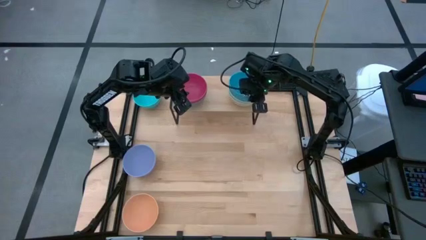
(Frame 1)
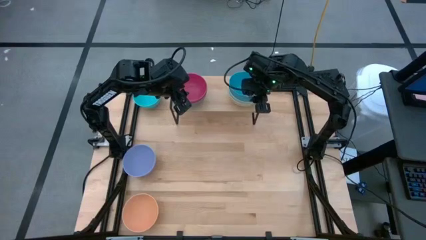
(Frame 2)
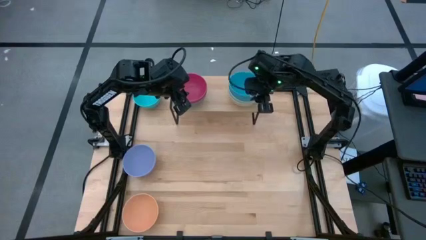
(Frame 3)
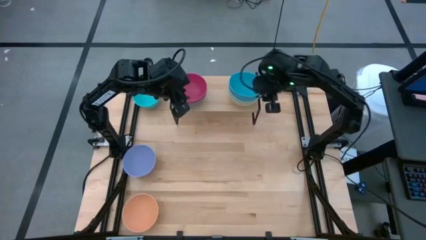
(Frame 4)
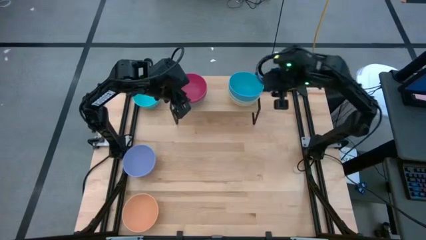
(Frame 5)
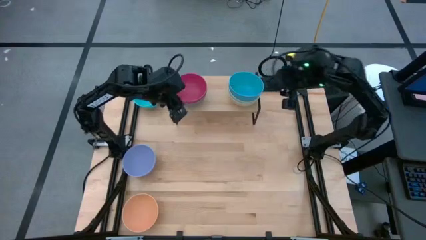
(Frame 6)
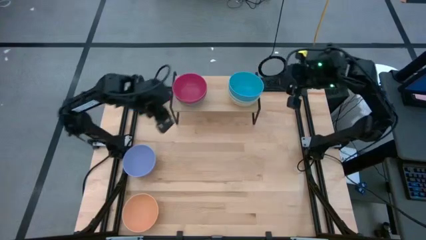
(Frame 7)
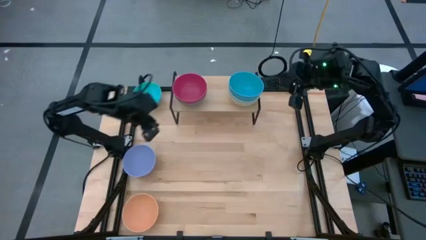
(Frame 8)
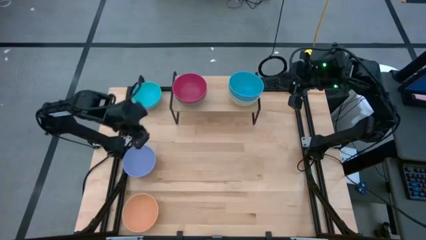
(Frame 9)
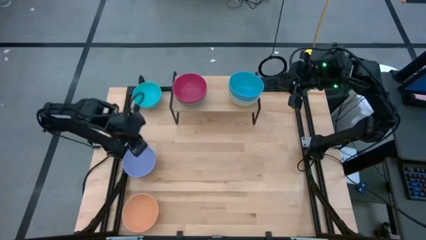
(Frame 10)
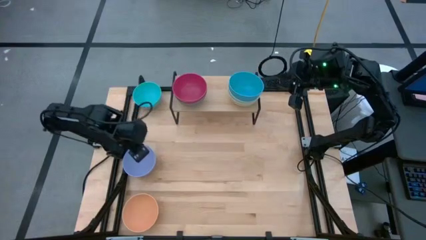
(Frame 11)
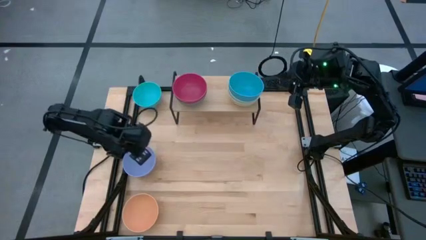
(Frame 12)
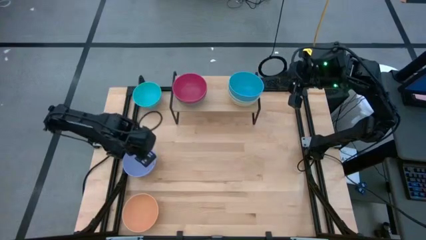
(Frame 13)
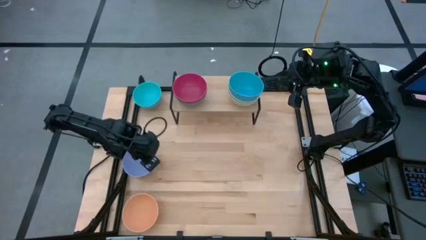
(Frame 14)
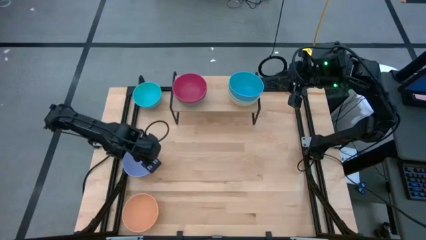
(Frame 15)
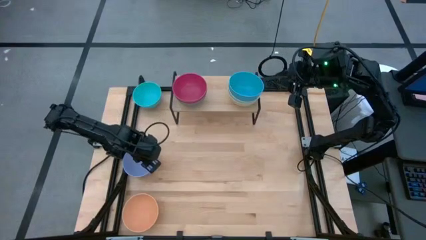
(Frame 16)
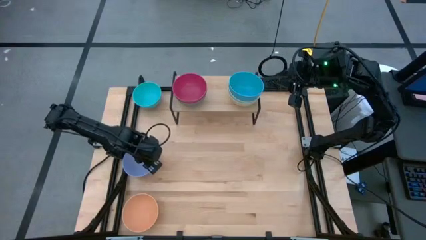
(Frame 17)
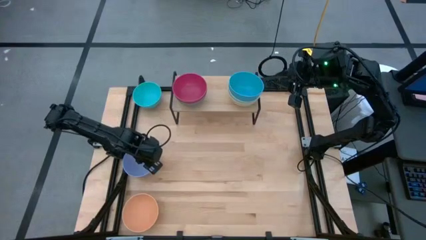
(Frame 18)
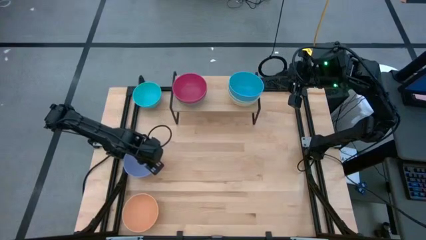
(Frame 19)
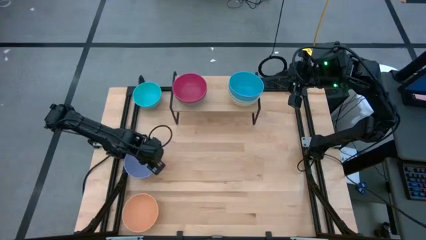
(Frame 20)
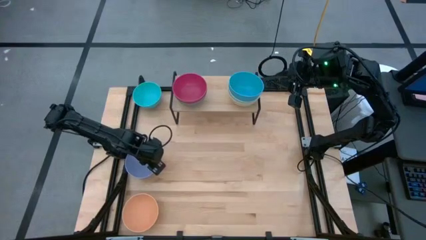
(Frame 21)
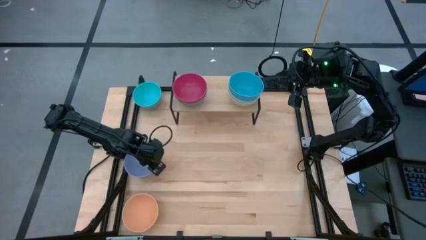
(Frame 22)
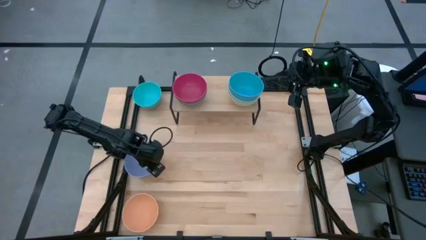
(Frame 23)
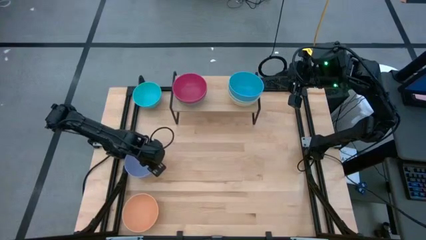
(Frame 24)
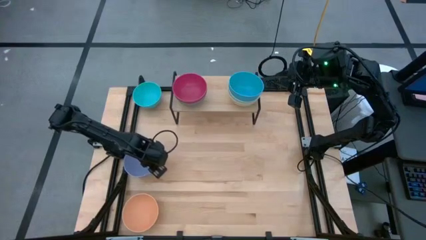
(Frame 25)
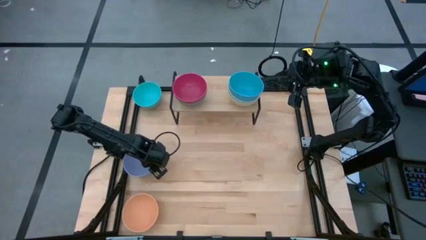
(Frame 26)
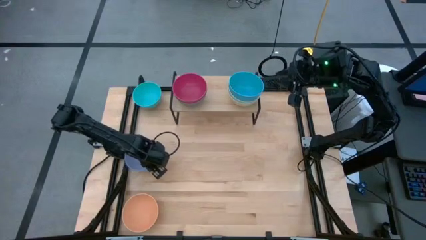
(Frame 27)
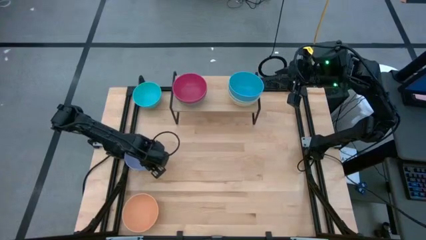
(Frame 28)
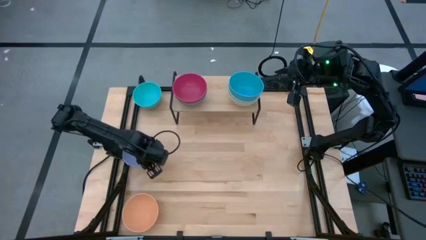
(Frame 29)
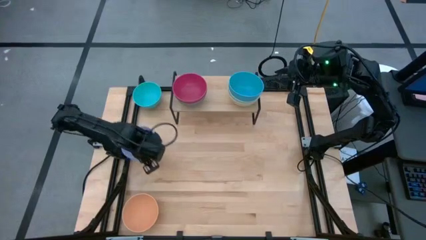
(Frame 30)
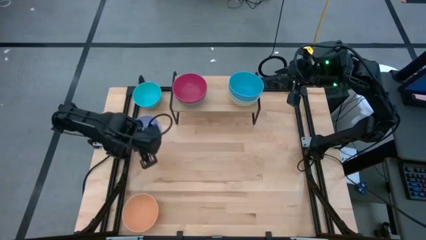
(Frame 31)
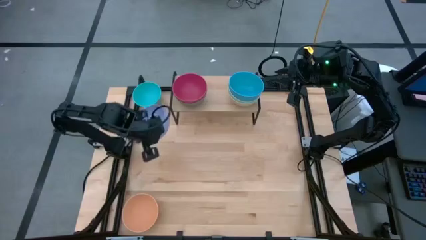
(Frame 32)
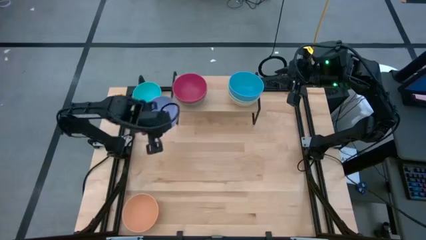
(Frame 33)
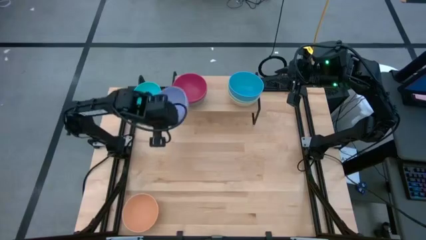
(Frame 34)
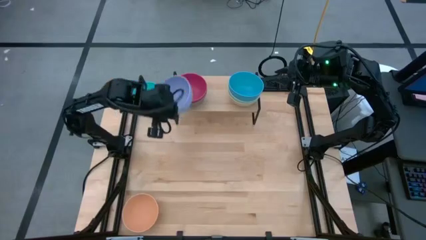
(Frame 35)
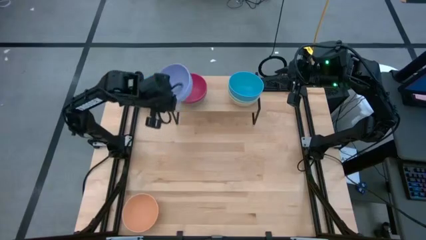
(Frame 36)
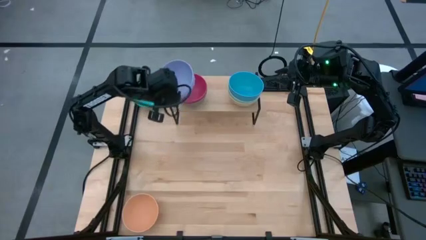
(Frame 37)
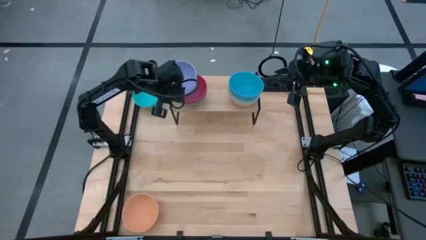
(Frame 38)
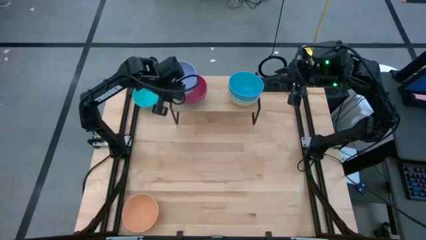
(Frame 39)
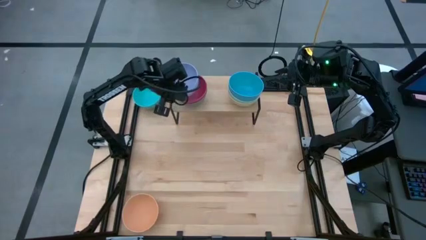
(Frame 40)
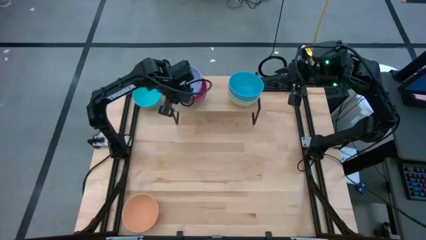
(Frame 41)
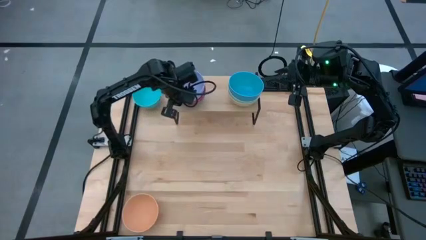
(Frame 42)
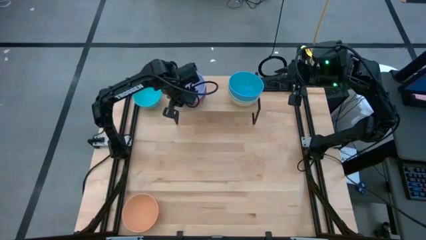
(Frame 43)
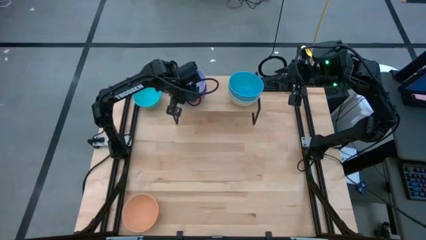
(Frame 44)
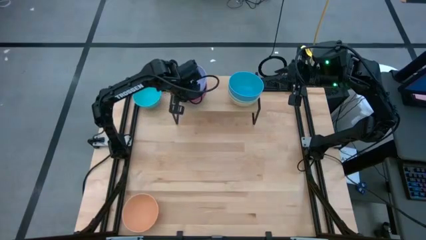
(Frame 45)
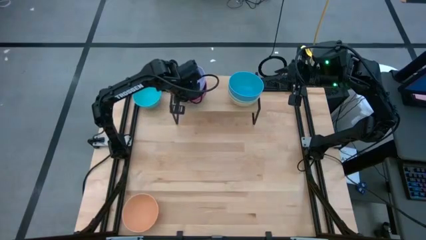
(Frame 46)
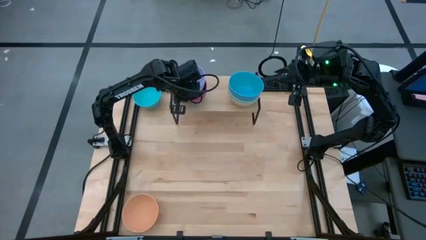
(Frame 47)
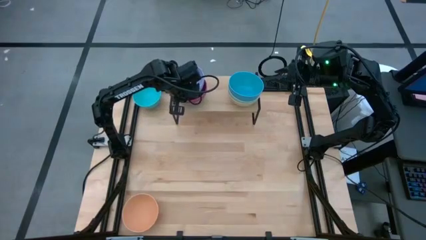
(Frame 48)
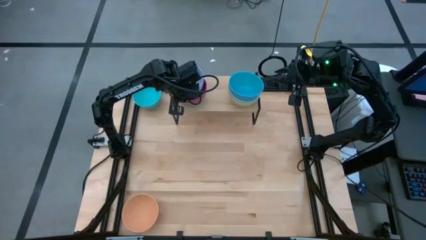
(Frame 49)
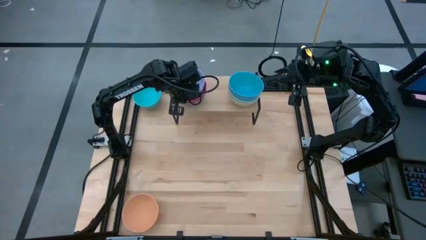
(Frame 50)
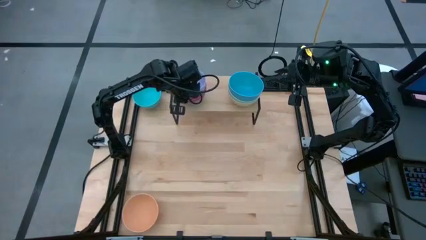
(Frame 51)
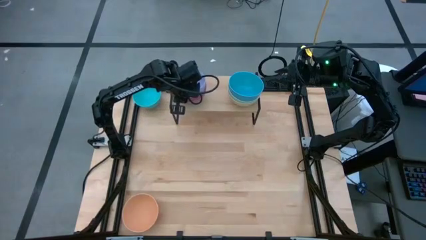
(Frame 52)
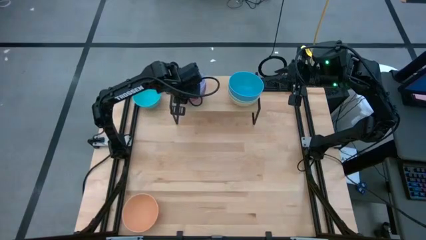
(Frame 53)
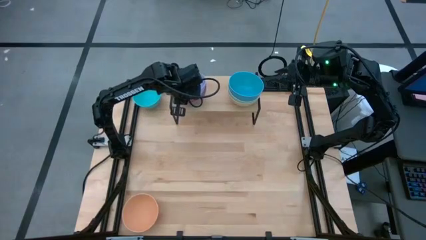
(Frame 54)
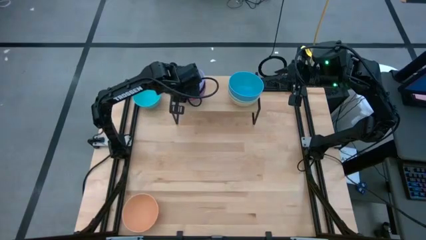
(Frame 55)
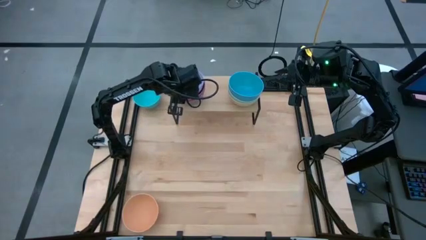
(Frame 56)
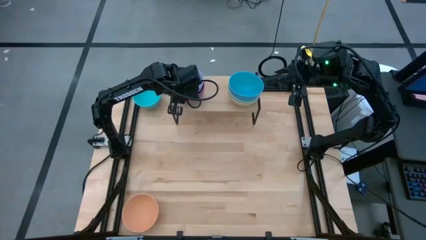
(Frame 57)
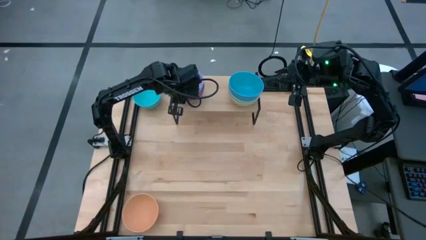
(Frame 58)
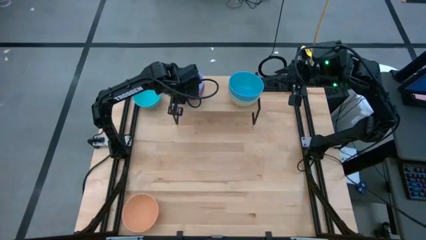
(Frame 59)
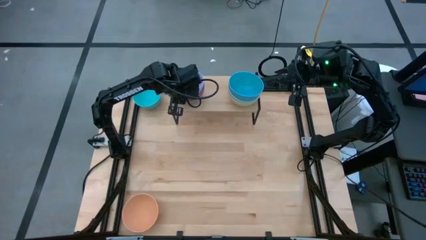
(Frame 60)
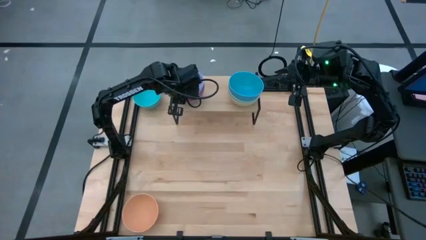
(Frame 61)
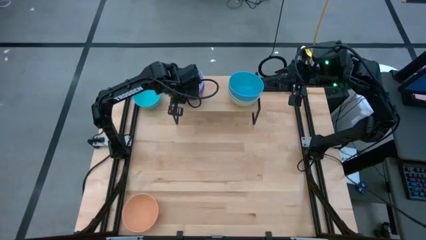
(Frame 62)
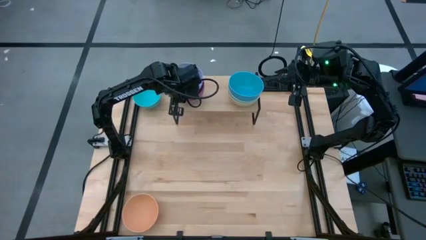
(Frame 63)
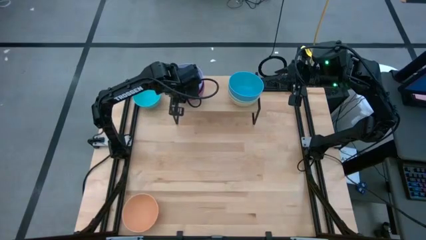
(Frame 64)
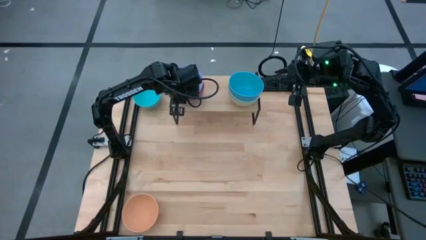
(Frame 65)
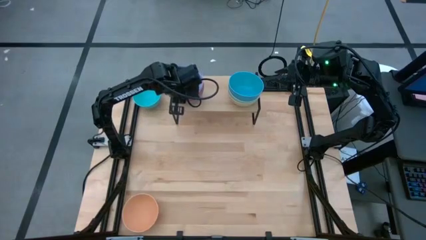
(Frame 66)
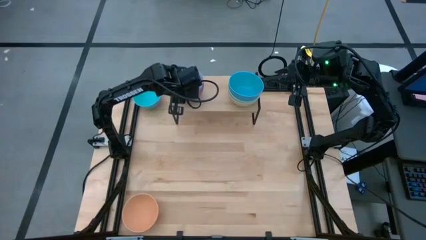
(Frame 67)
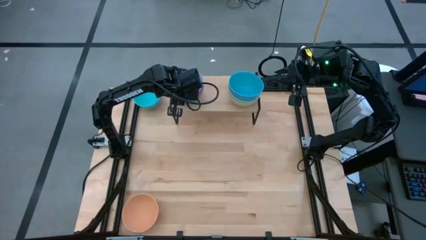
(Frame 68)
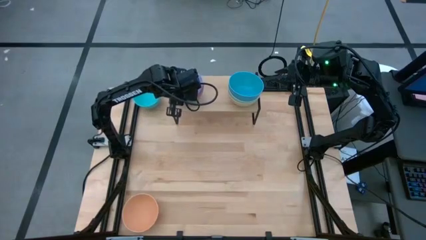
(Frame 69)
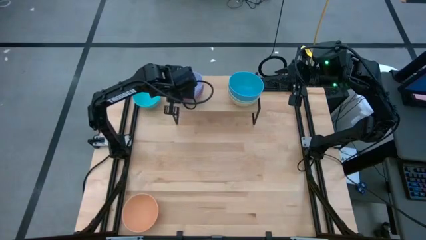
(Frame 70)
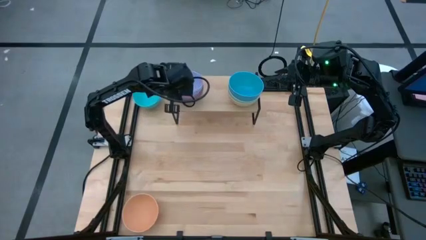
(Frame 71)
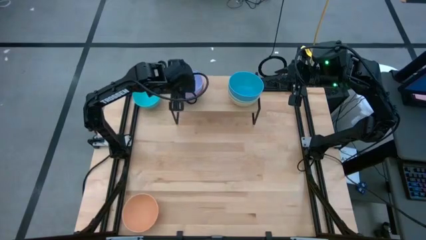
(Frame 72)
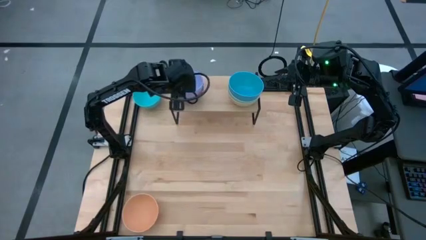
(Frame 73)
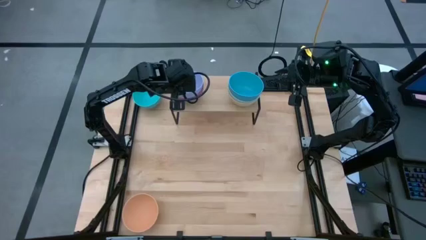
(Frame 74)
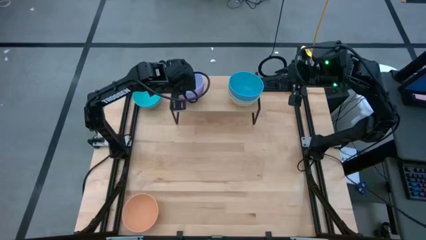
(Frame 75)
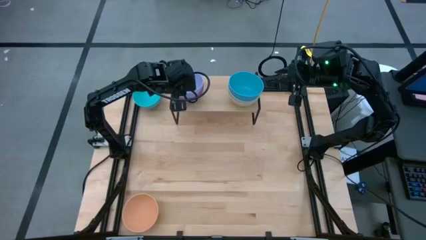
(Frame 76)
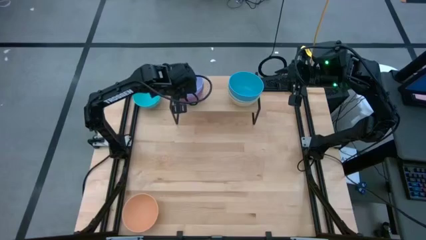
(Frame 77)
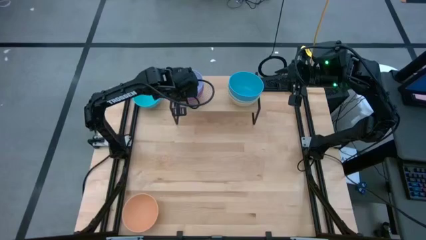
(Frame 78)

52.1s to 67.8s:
Task: Place and stack bowls onto a shelf
Stack the purple bowl on top of the red bowl on the shelf

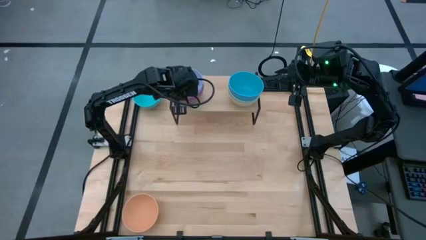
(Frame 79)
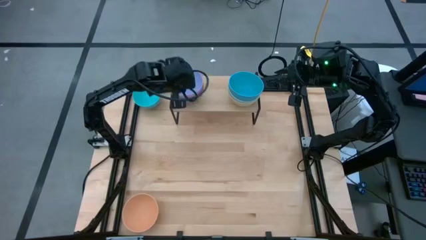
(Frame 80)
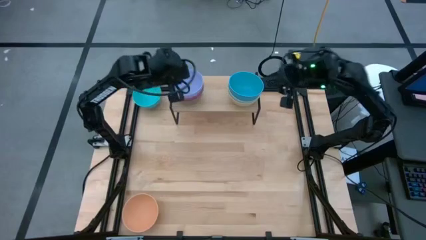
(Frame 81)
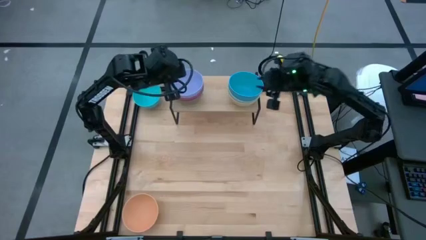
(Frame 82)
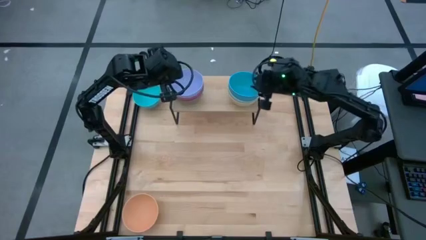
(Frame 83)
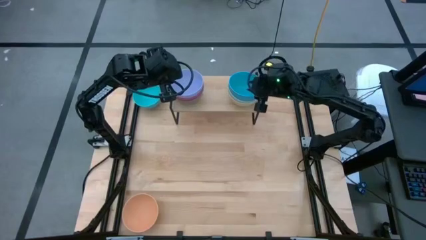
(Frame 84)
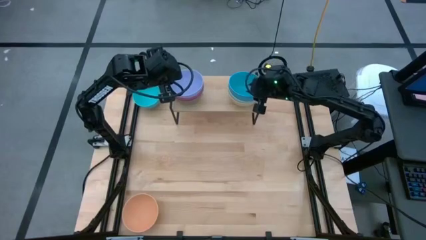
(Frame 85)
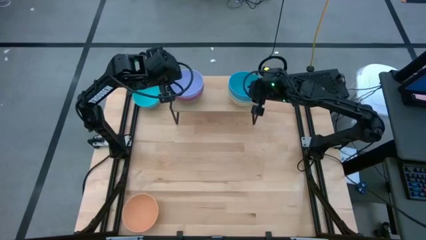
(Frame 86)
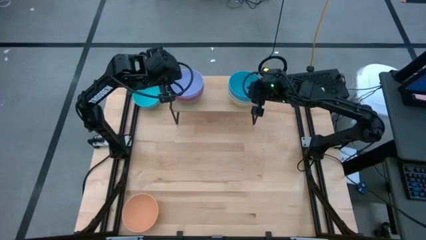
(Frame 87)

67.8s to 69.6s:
Adjust the blue bowl on the shelf
